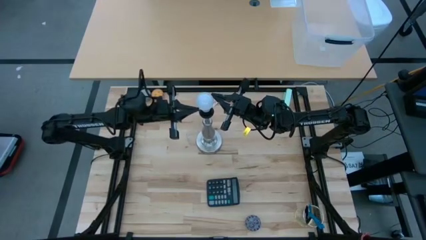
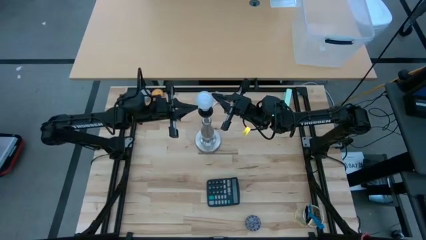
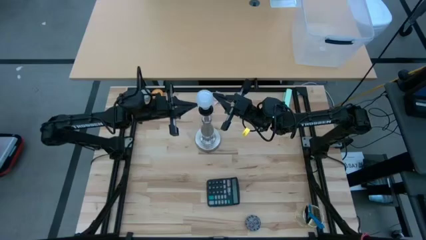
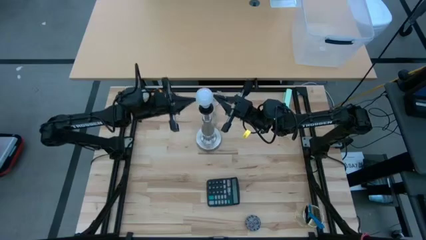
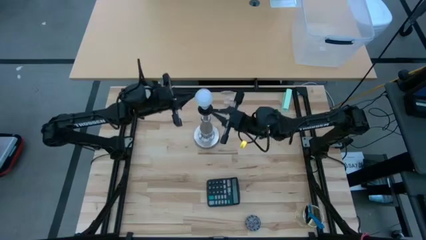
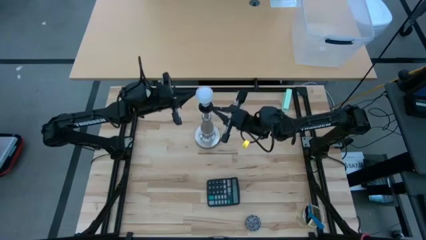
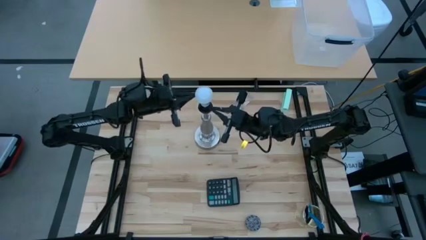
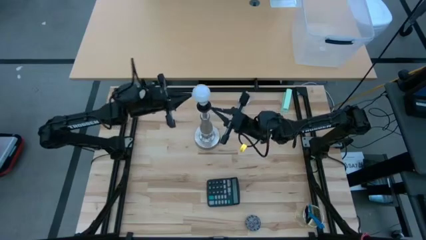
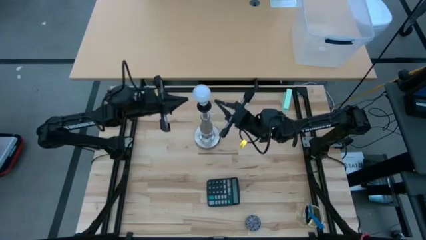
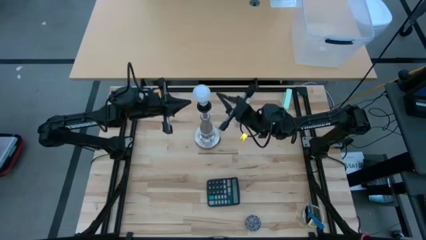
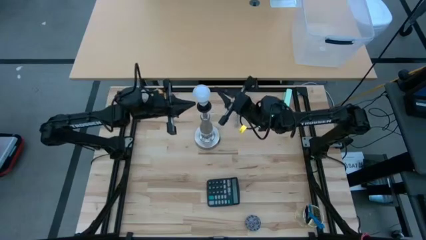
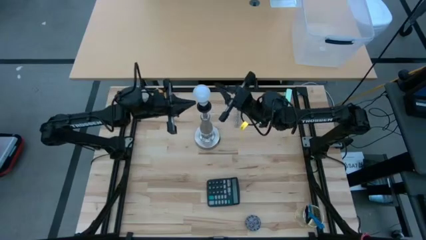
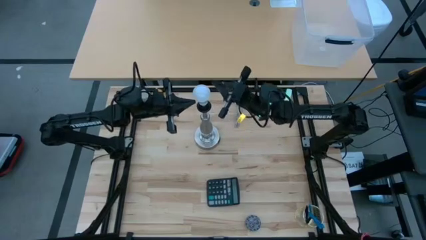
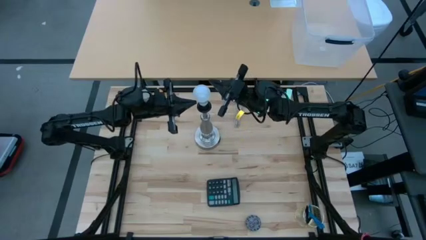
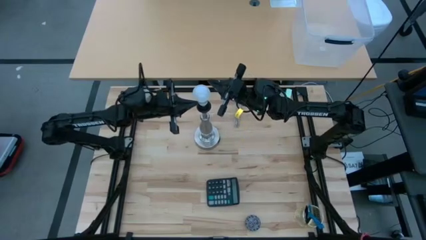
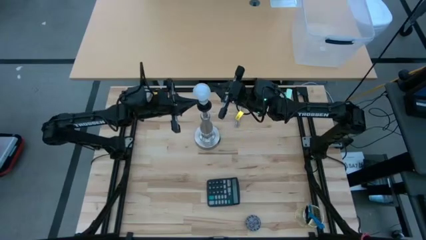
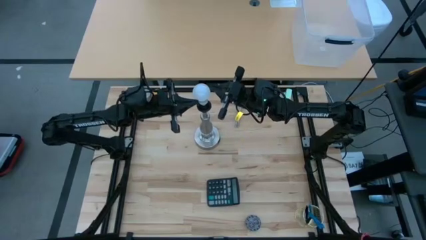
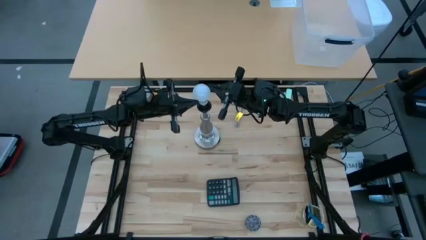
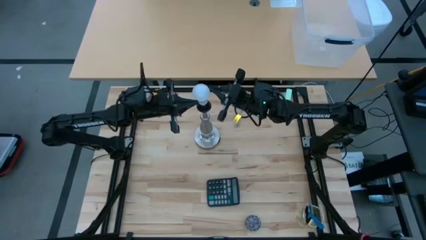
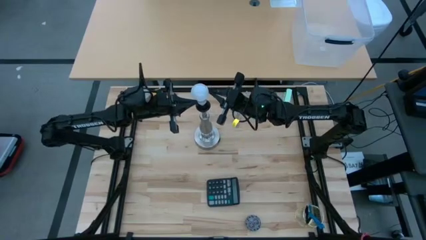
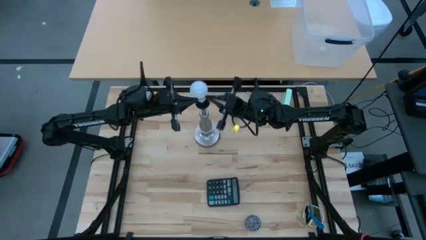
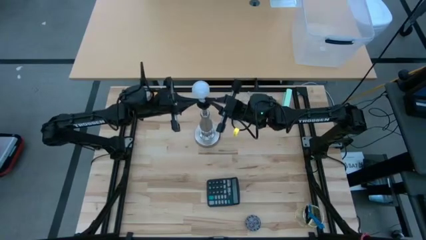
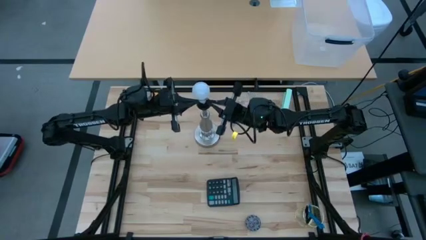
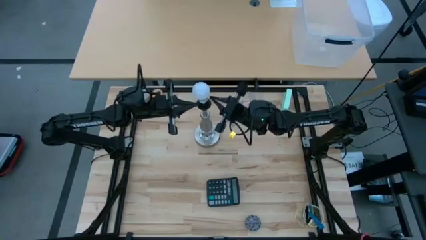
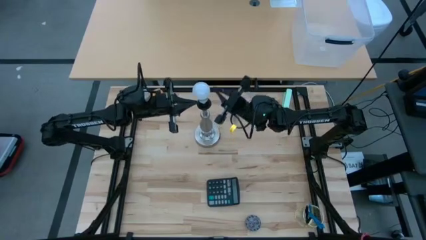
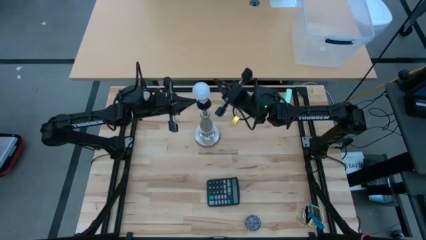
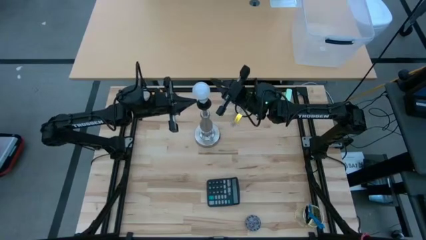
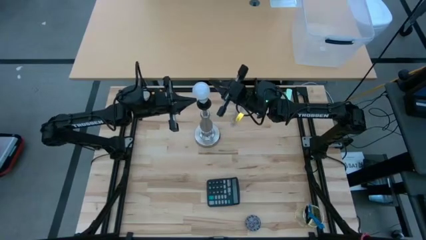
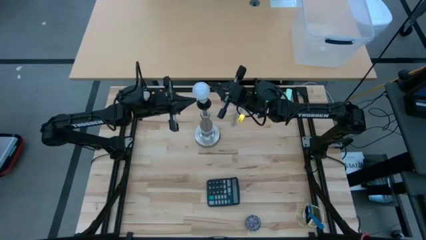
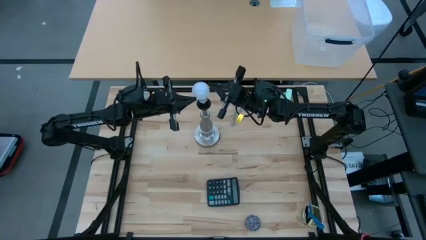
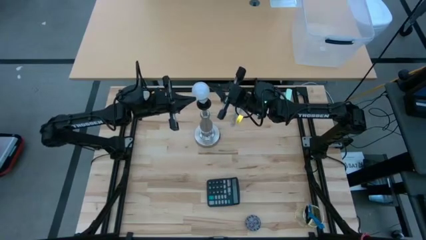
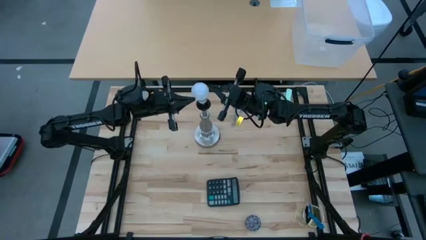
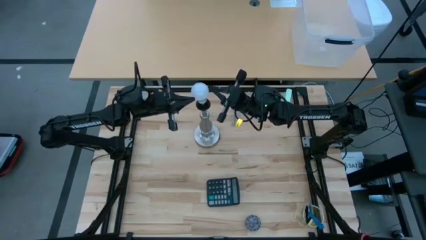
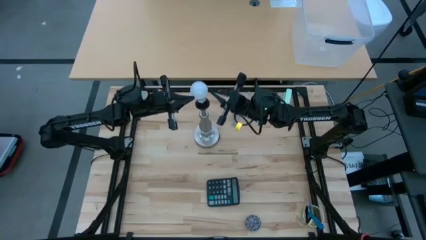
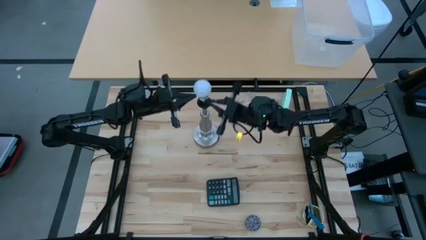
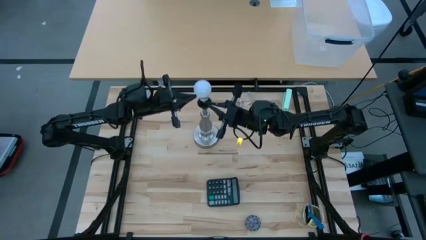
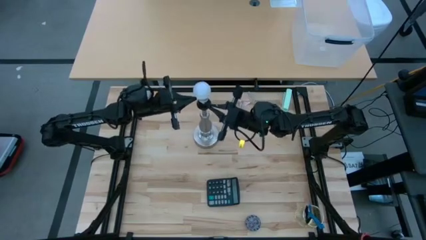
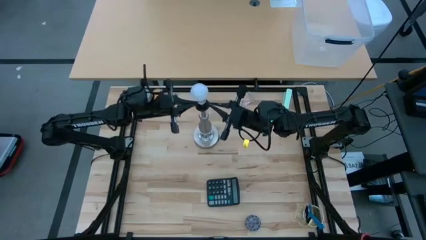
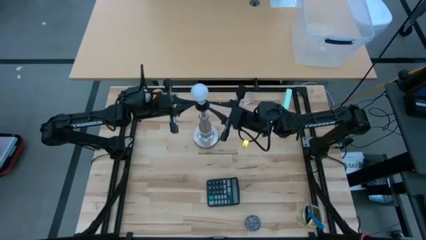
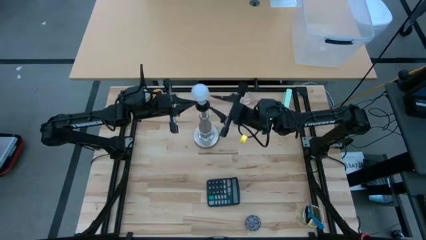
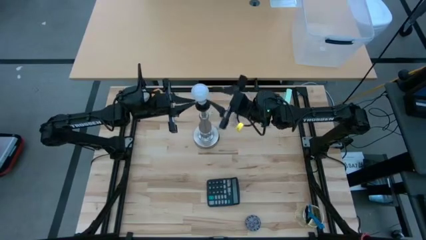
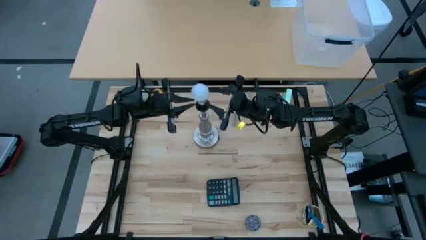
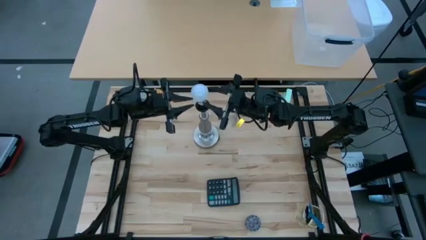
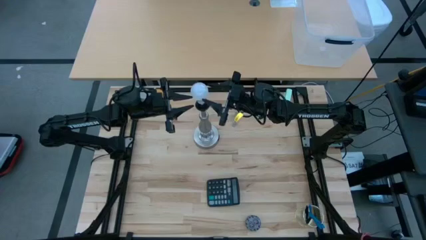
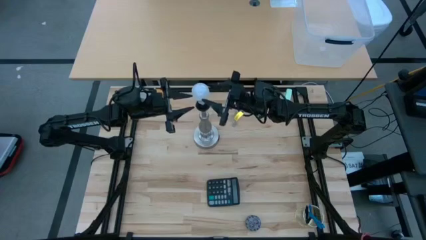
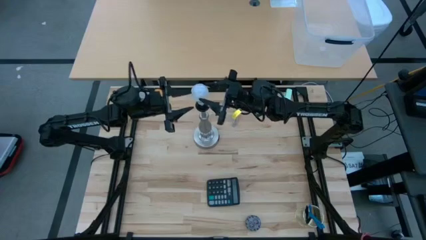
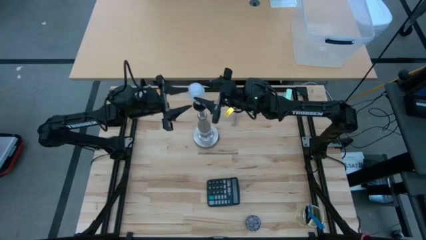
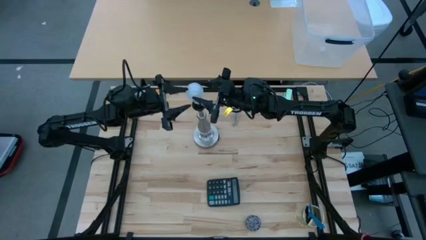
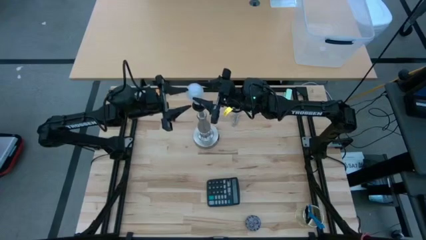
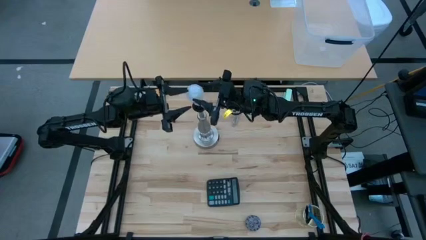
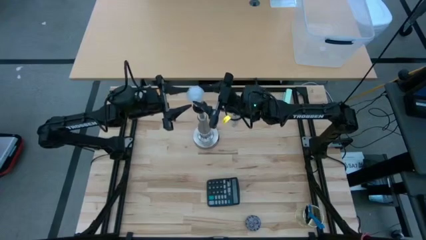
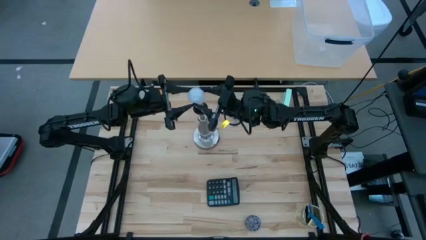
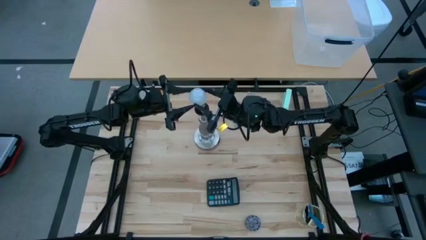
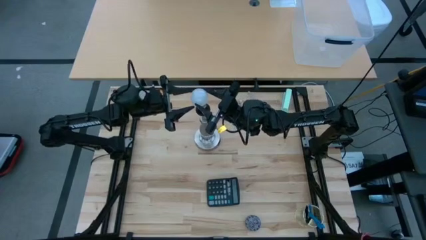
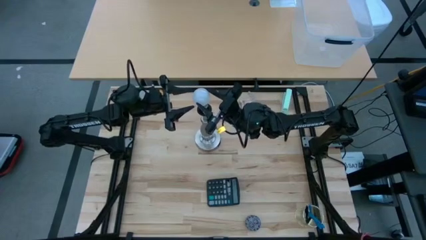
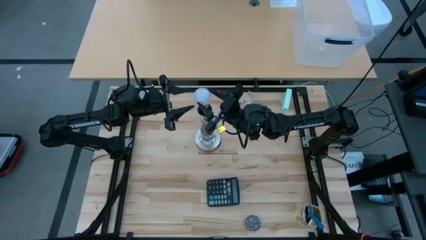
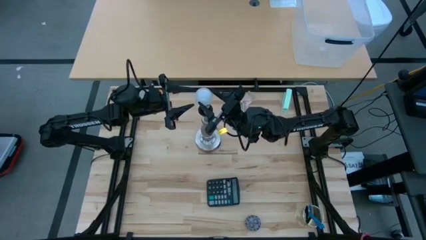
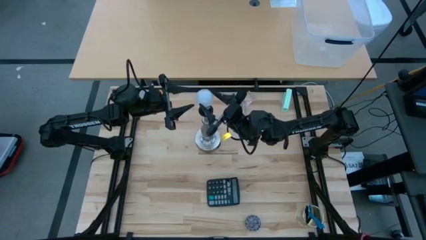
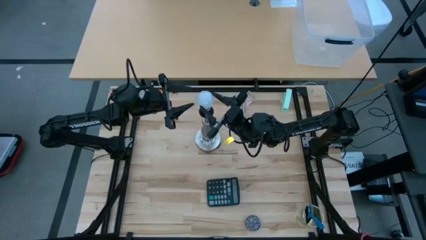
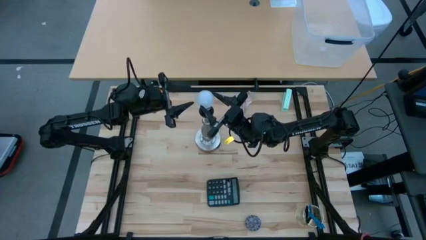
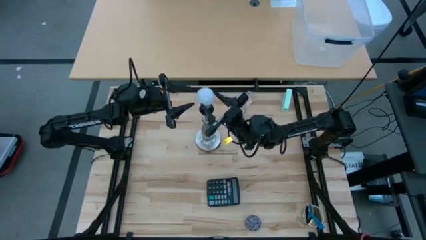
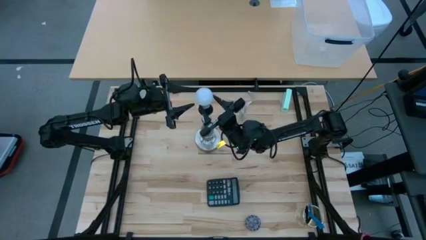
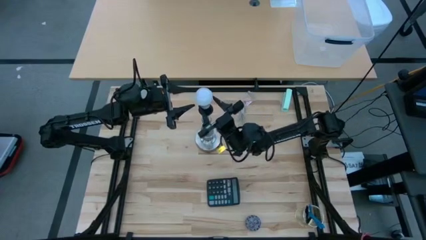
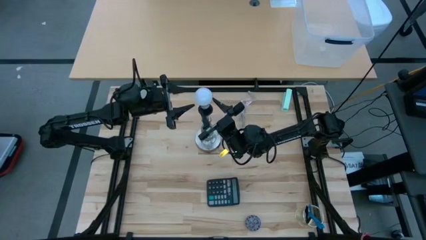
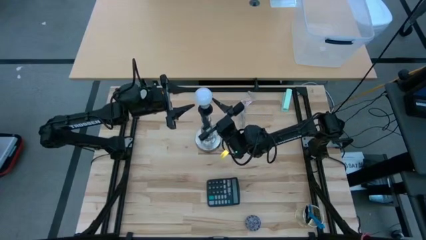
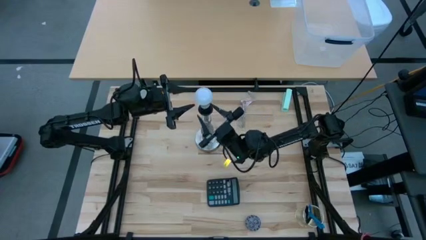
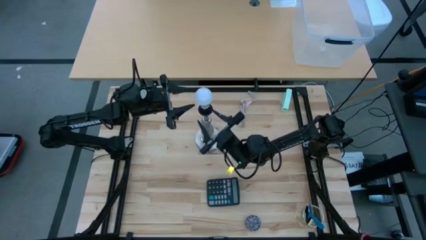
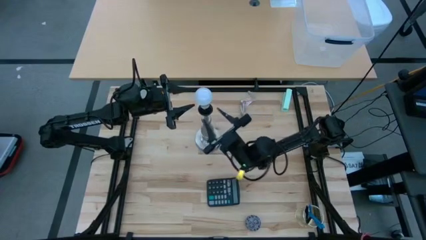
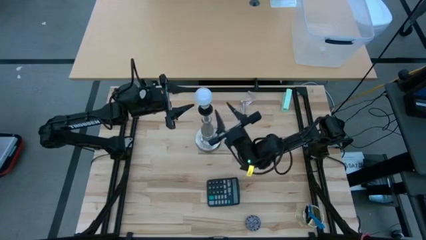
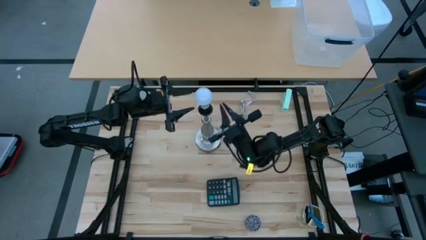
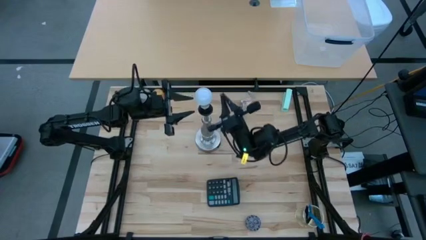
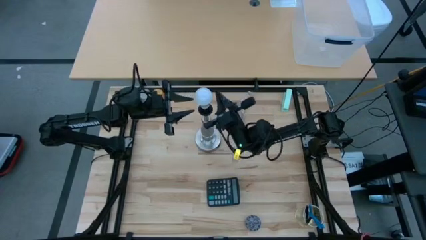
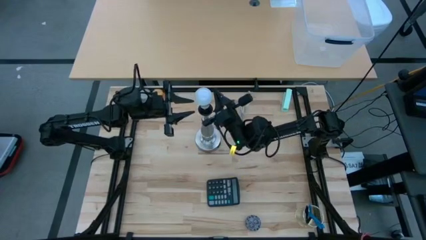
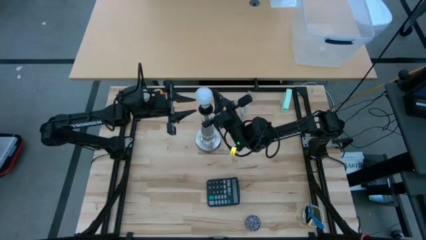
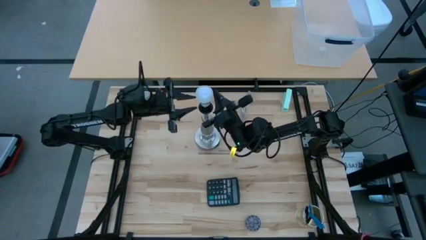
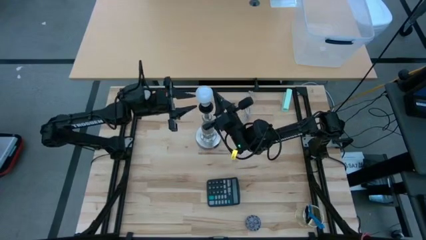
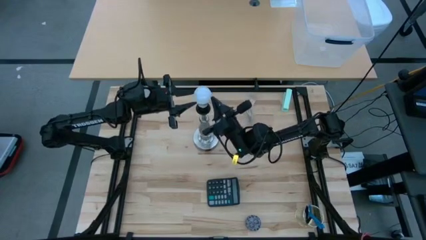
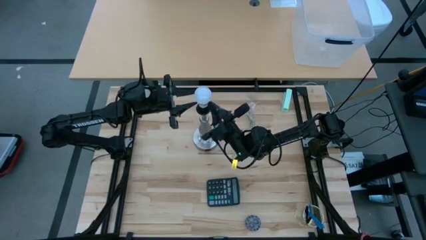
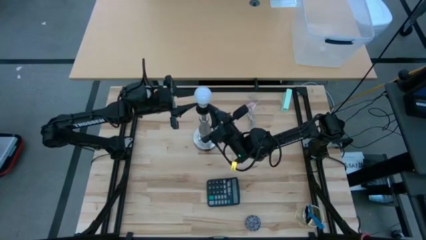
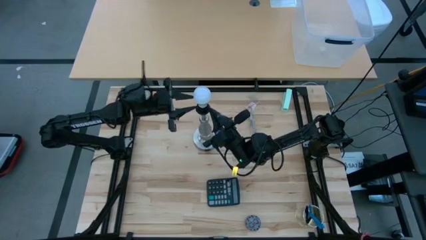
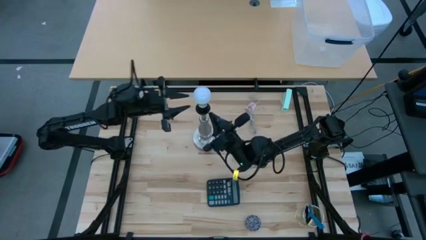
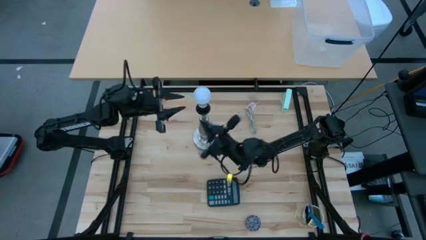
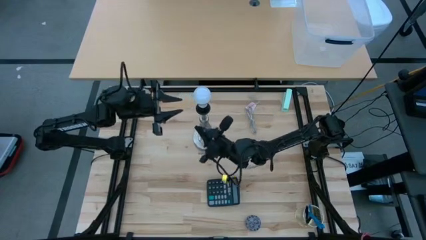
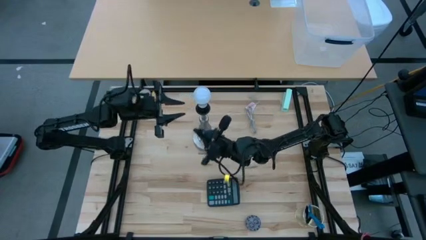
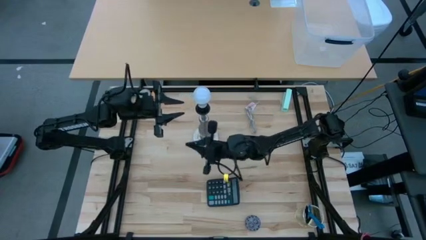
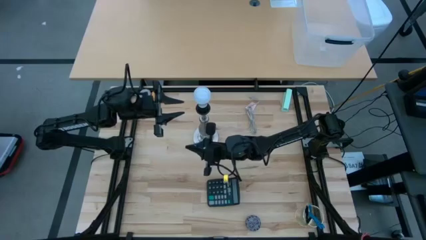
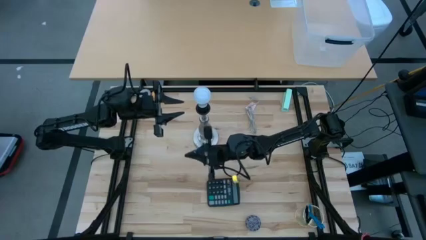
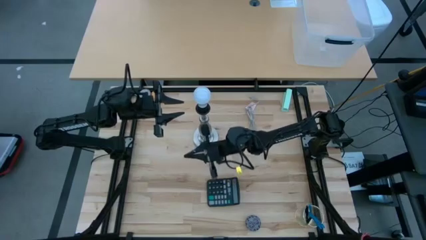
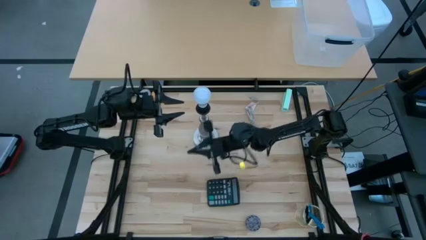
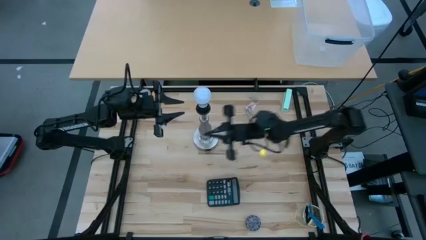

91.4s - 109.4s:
Task: Screw lightbulb
Insert the light bulb into the lamp
